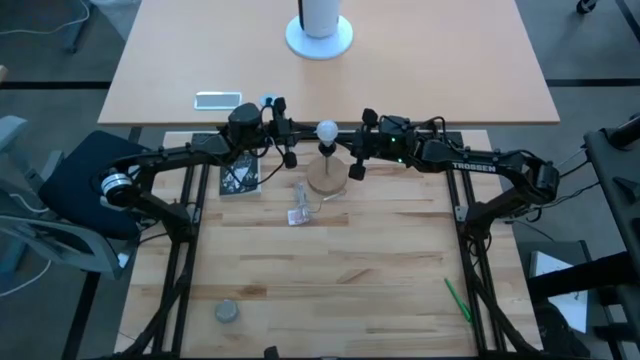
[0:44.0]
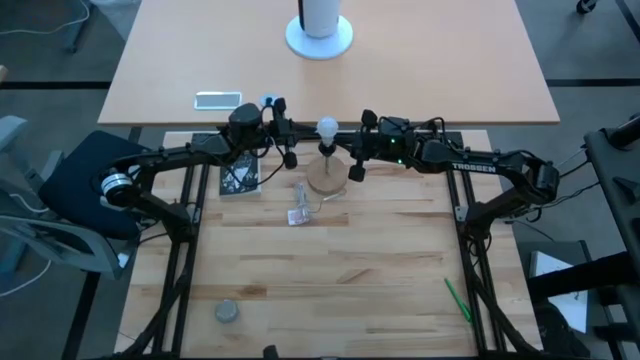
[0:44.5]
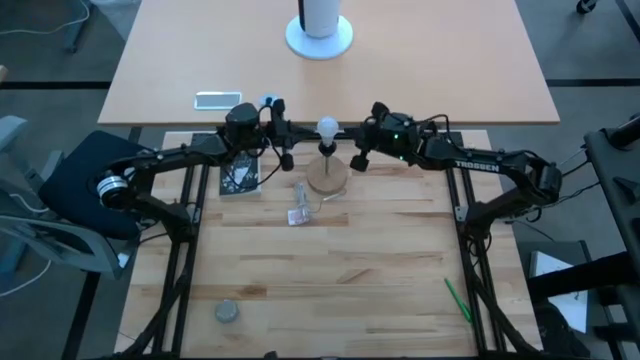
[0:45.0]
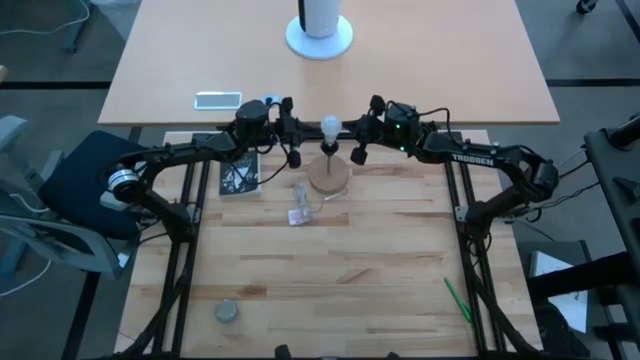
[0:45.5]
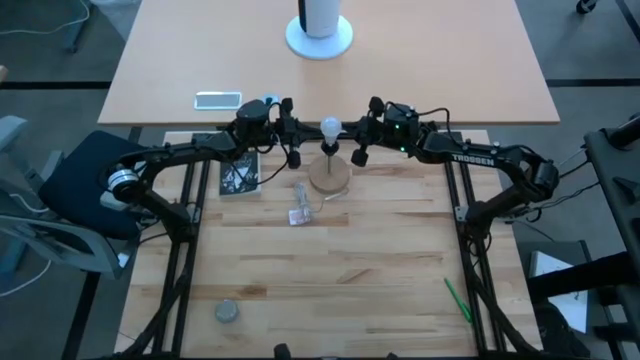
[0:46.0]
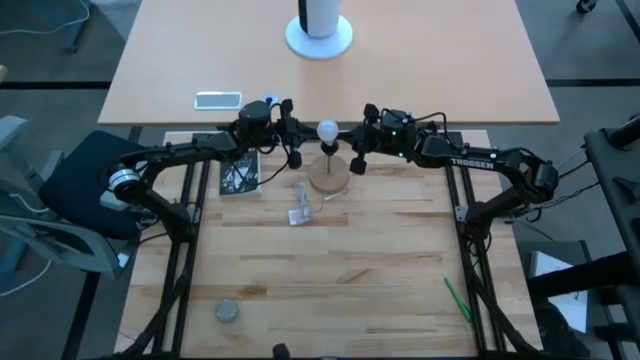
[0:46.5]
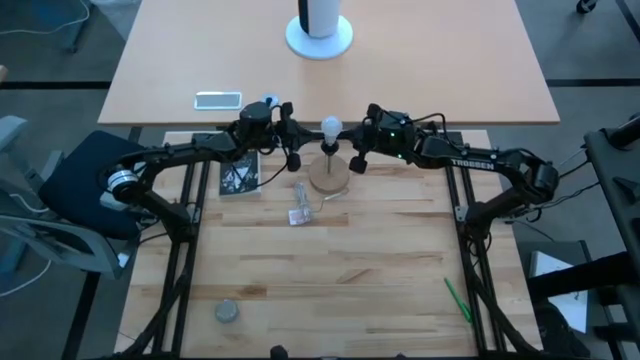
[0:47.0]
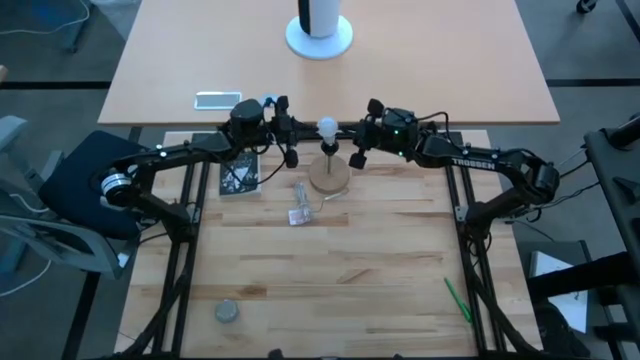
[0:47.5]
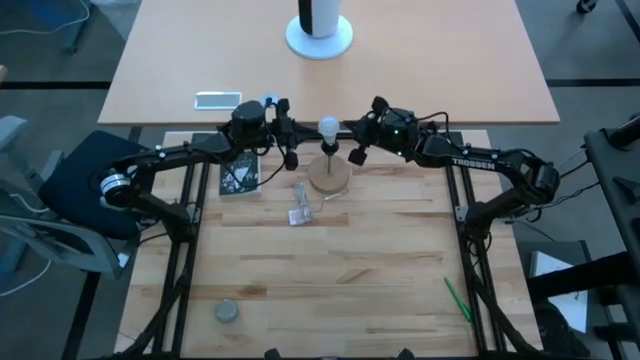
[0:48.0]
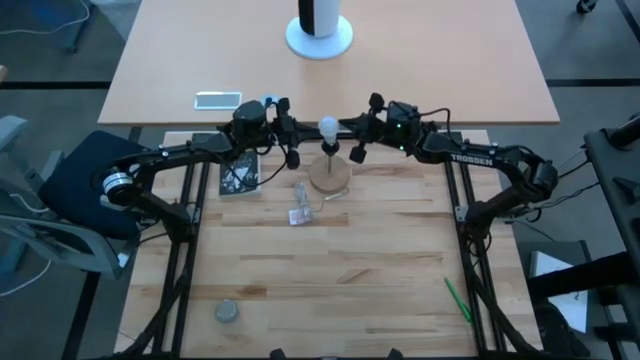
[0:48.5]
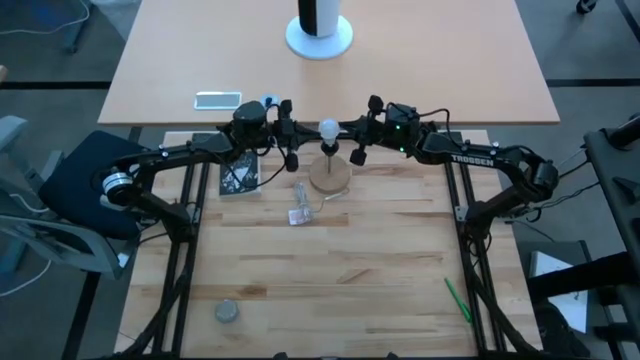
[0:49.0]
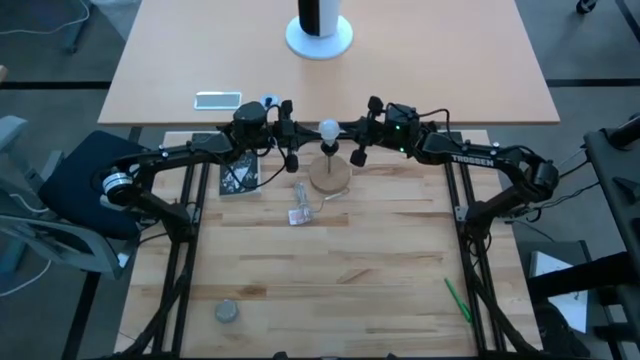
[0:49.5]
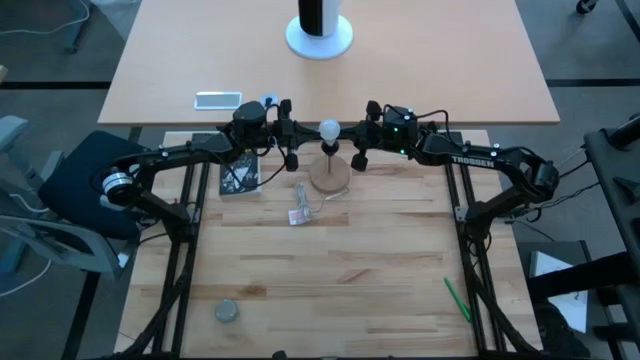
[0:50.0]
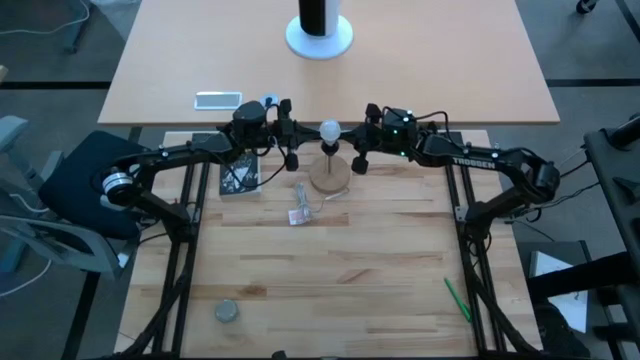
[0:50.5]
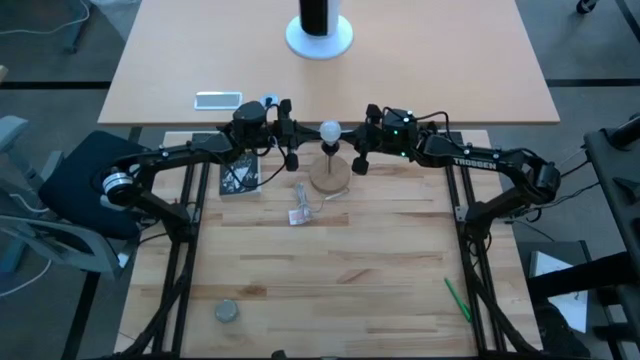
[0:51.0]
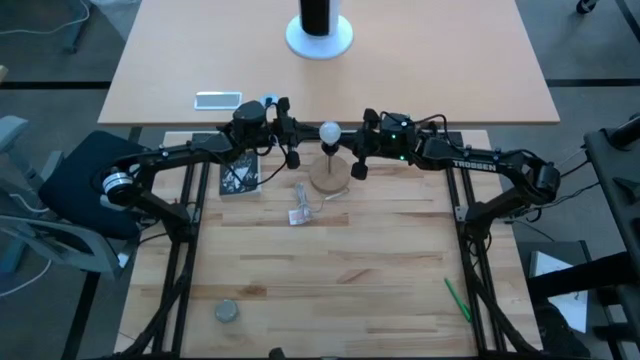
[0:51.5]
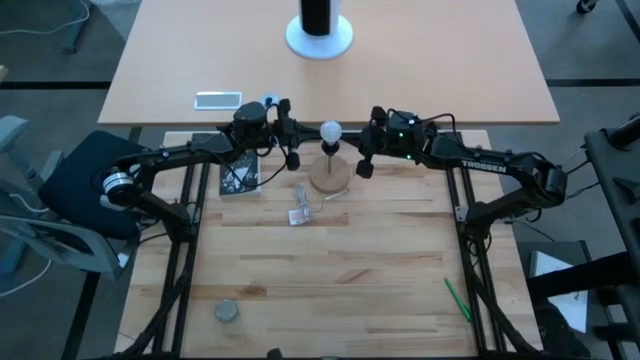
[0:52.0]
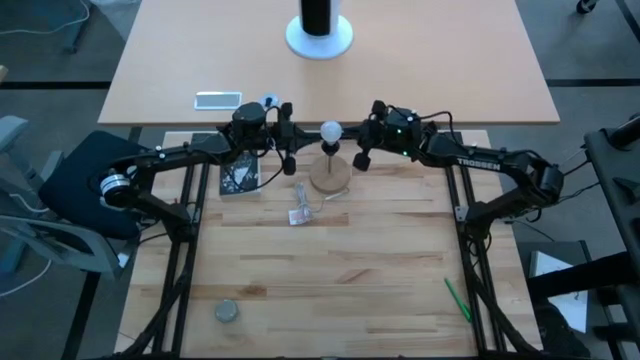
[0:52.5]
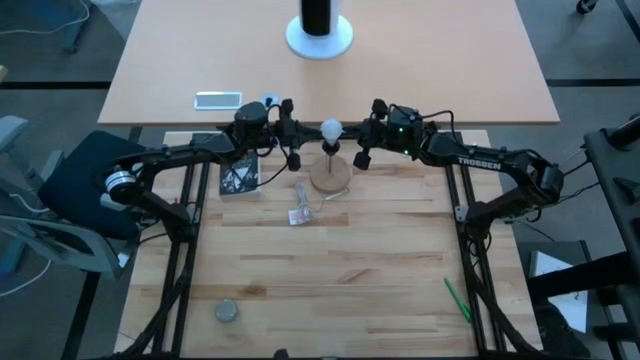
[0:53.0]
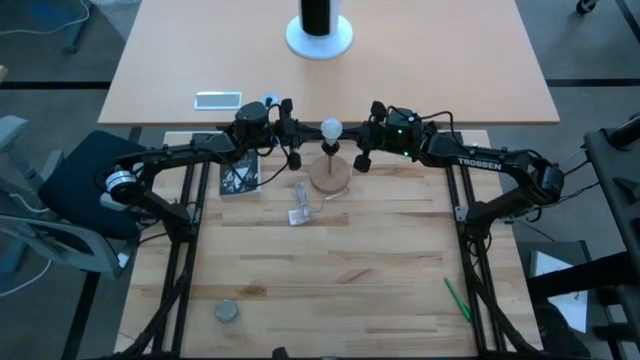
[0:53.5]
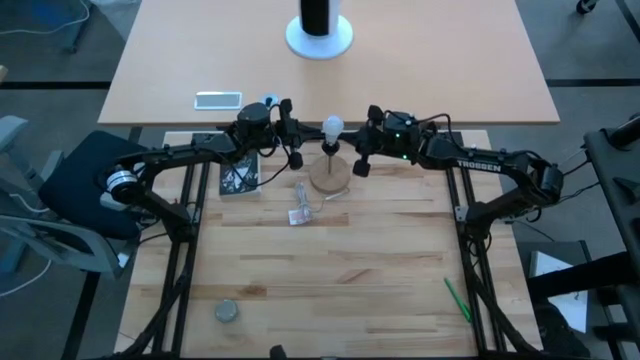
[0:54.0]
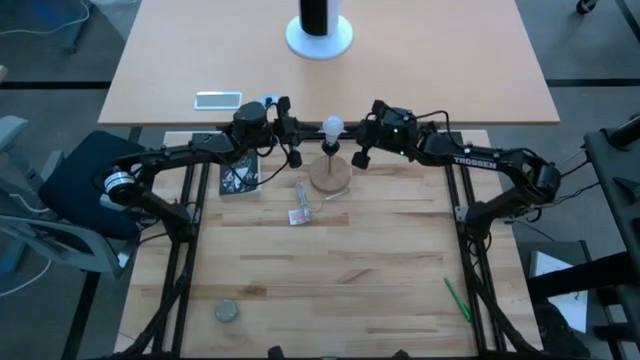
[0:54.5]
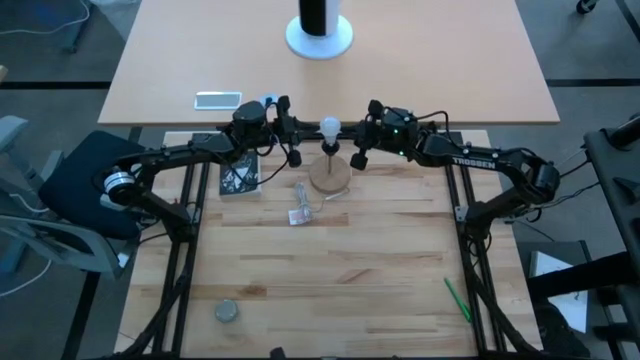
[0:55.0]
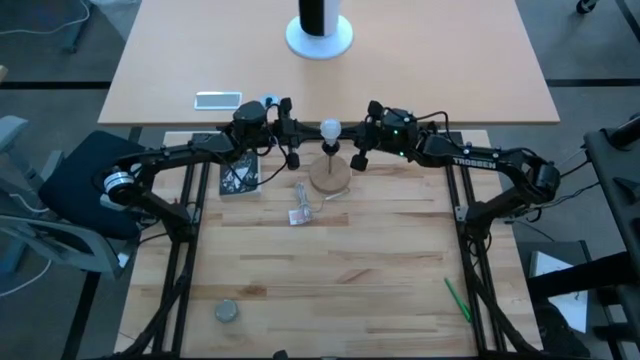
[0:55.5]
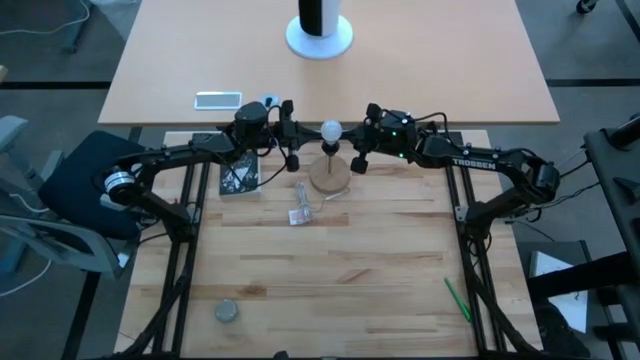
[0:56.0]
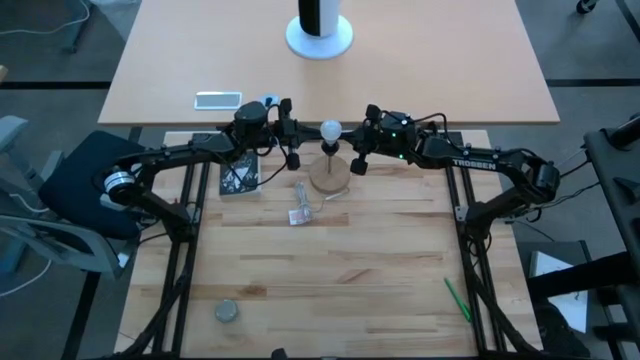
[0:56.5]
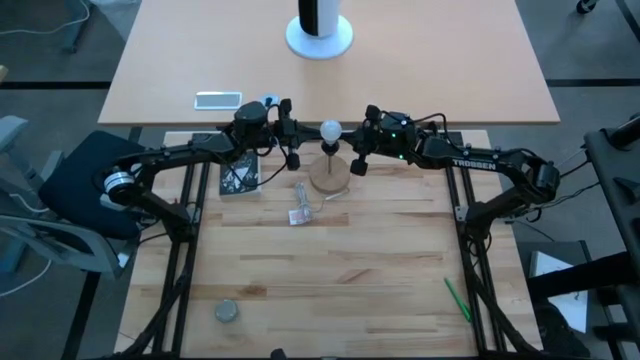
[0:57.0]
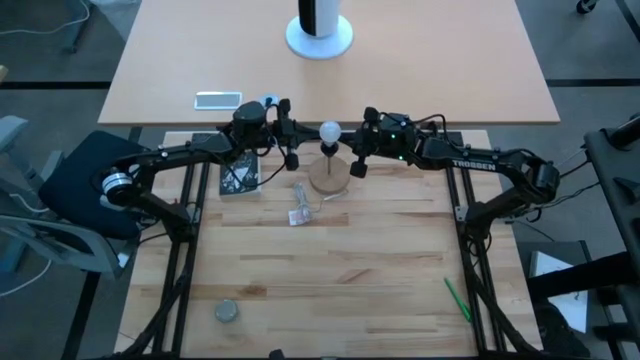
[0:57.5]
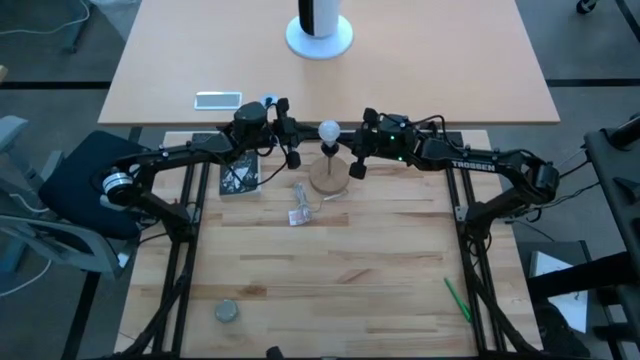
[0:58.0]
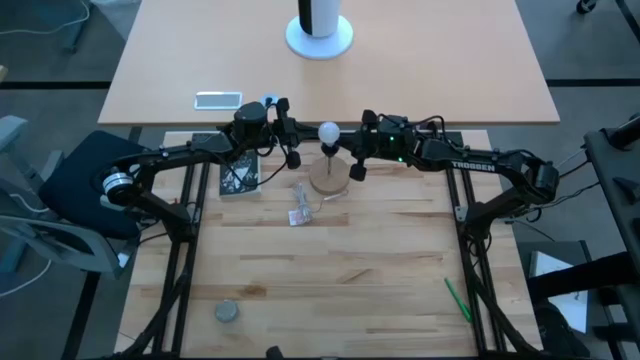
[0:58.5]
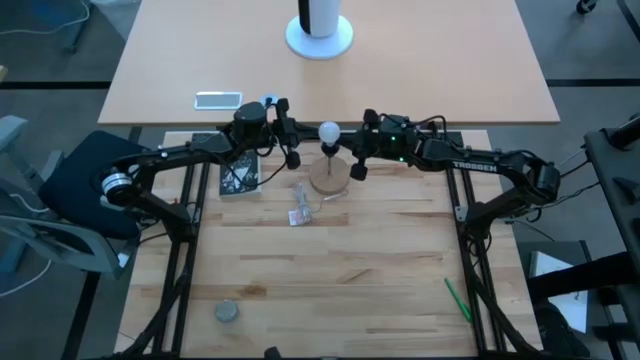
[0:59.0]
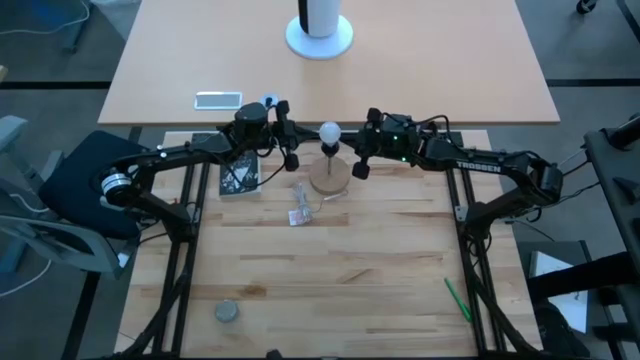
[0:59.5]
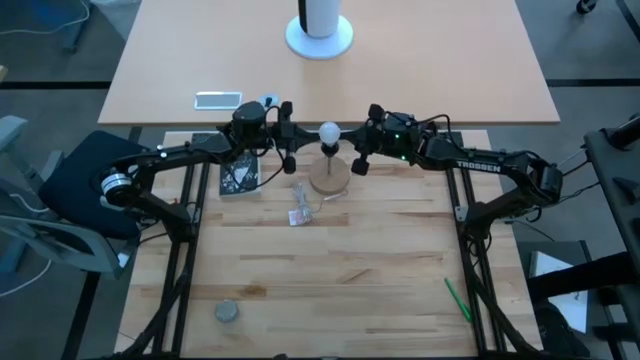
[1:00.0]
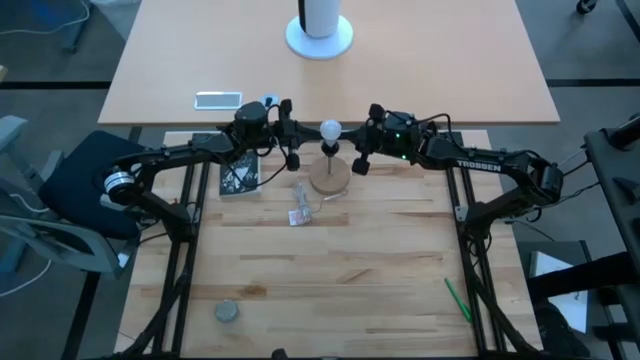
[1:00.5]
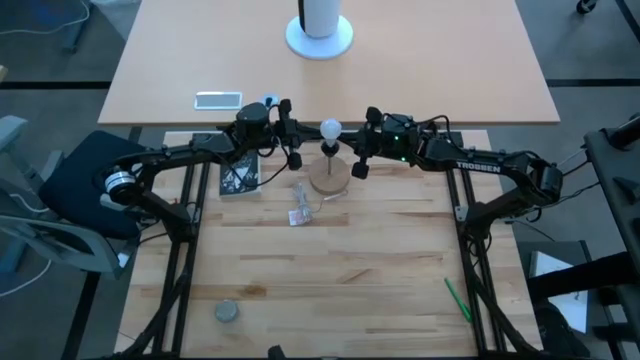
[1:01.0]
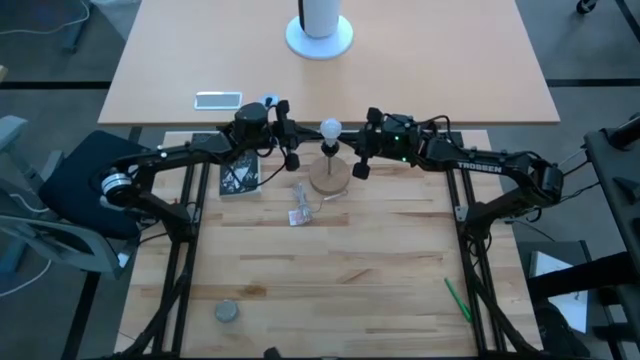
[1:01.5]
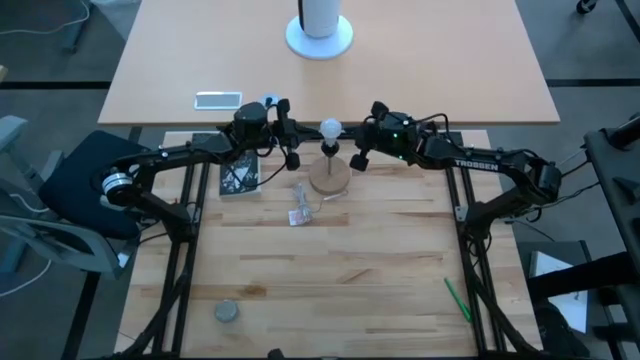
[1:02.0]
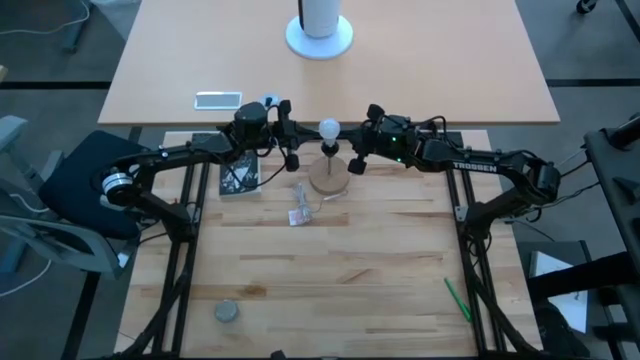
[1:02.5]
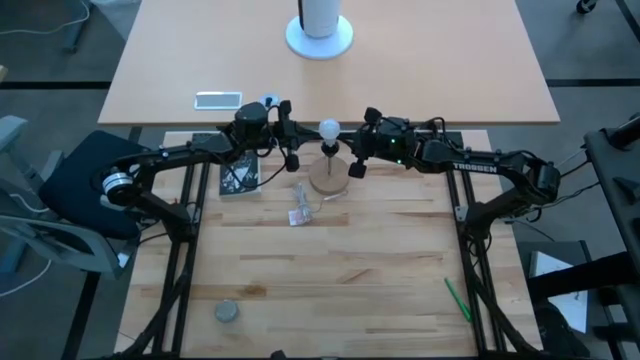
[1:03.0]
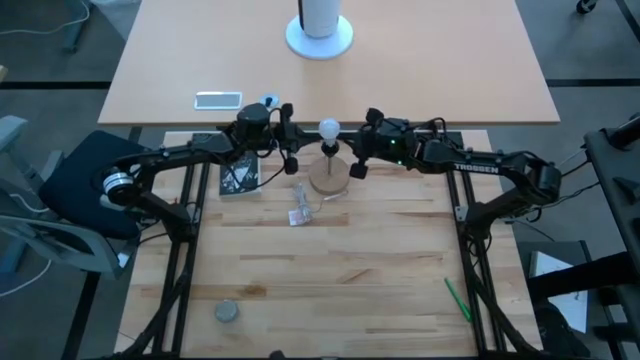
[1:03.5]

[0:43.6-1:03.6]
Task: Screw lightbulb
Insert the lightbulb into the black lamp
